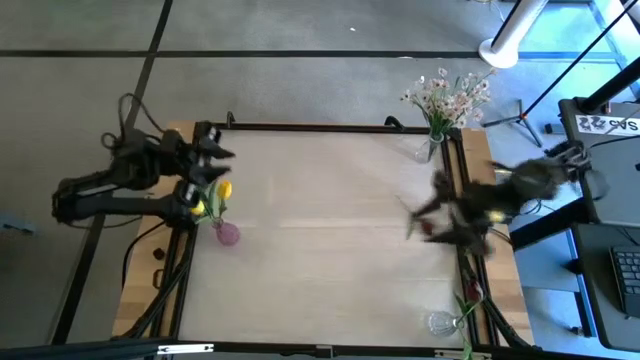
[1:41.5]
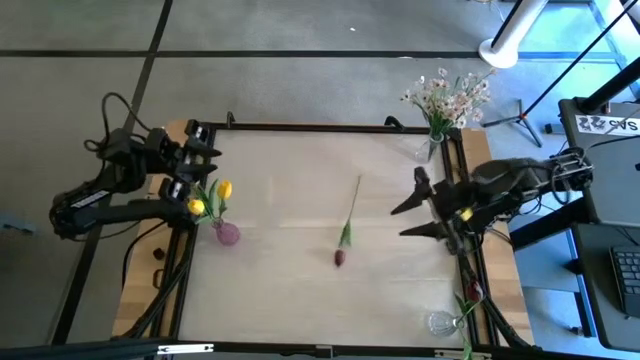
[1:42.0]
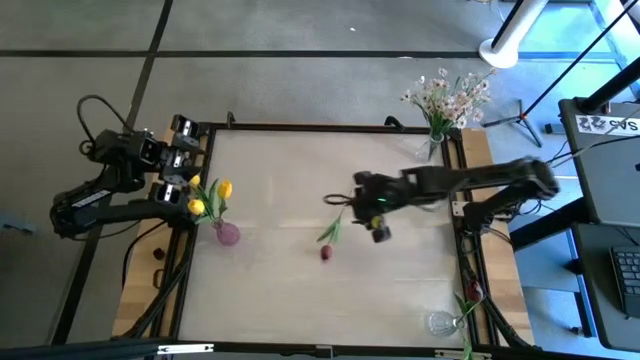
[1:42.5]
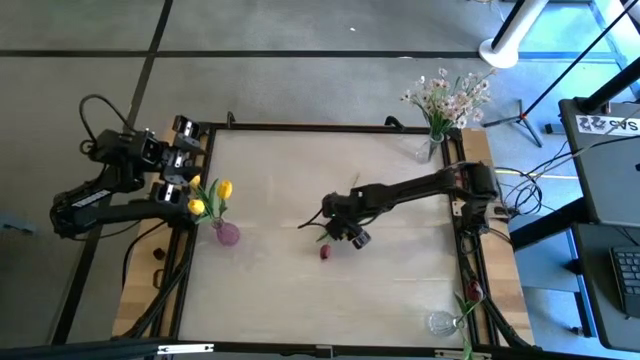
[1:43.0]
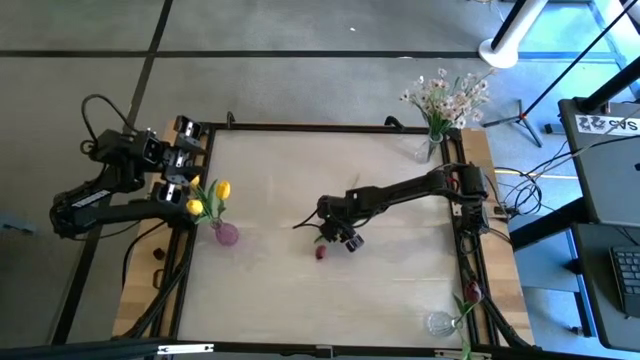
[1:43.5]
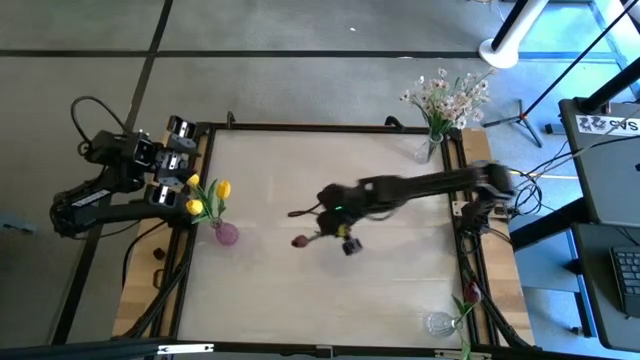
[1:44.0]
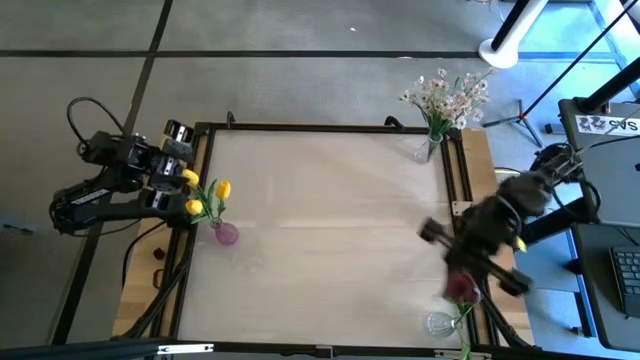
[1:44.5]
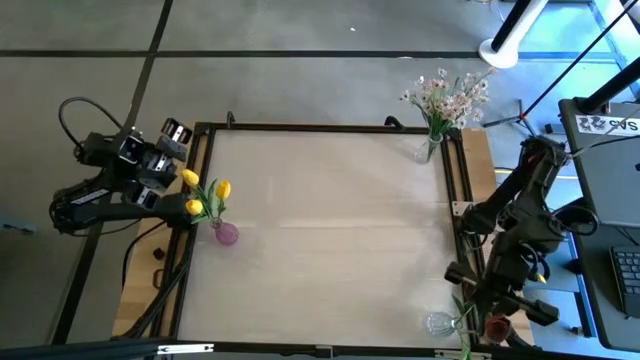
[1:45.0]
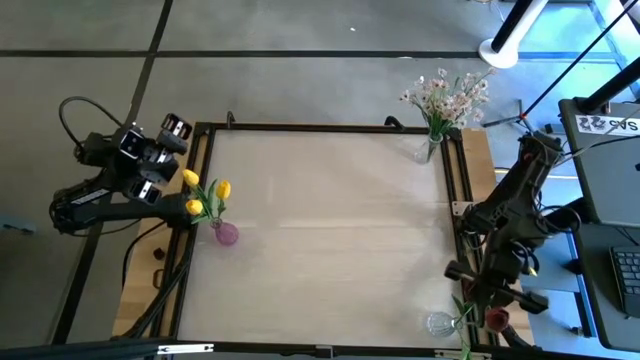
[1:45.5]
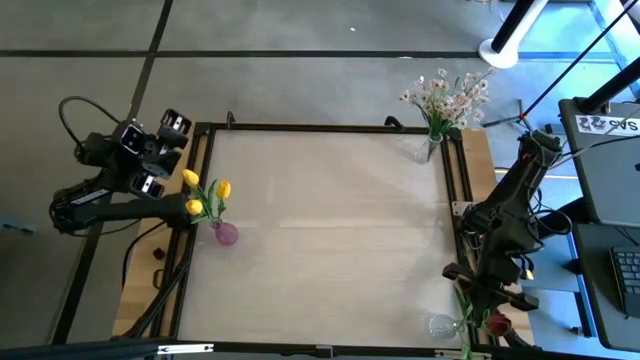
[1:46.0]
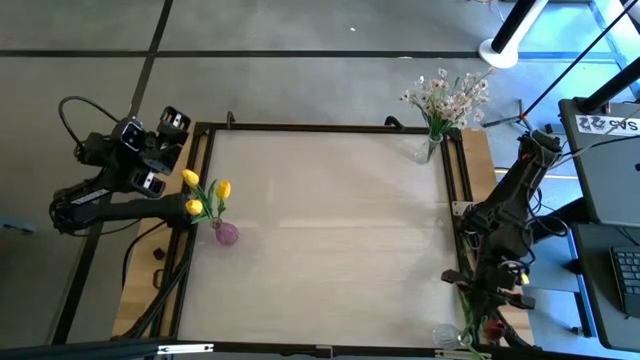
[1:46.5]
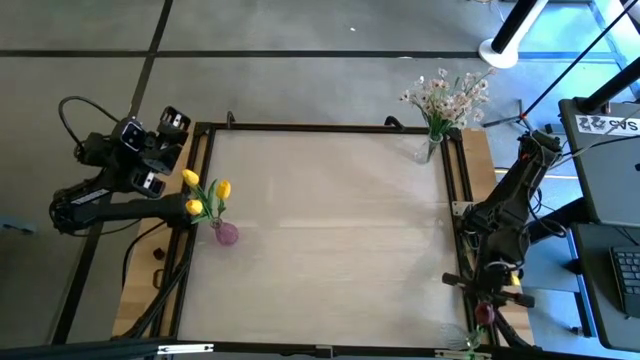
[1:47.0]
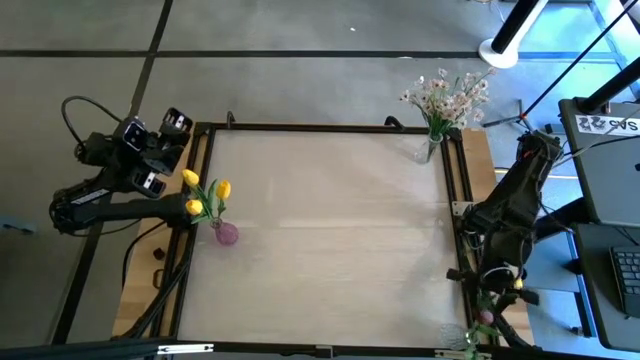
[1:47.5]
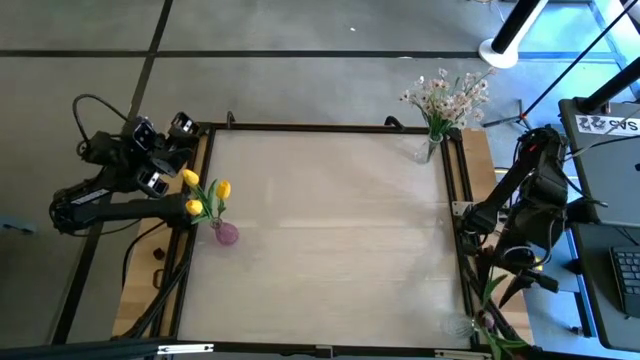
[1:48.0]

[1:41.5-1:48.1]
Task: Sort flowers into vase by color
Put the red tulip into the bottom transparent flower vase

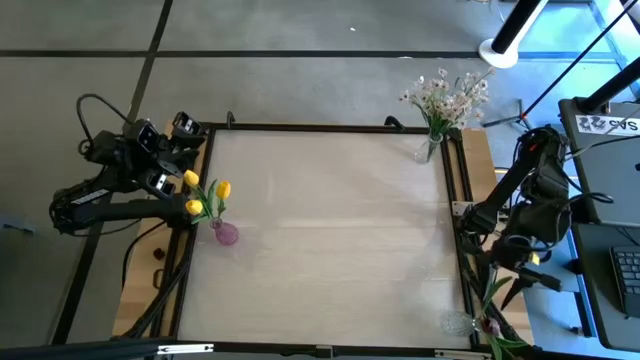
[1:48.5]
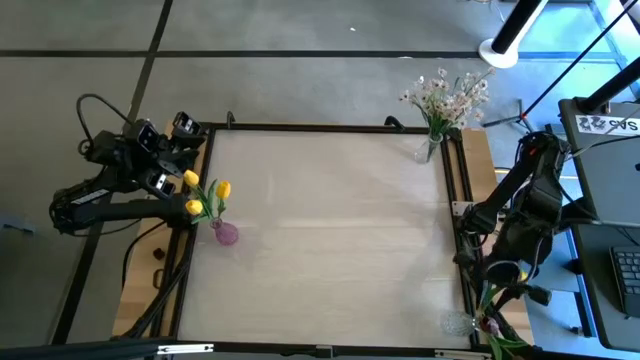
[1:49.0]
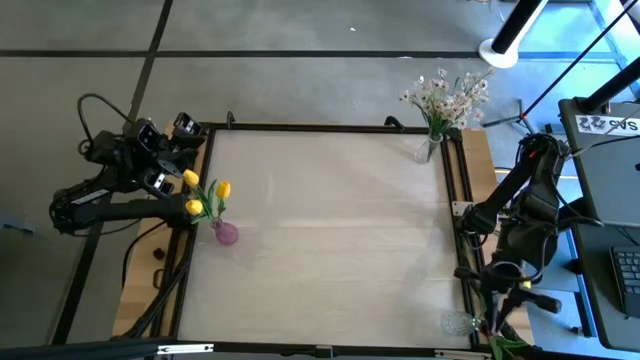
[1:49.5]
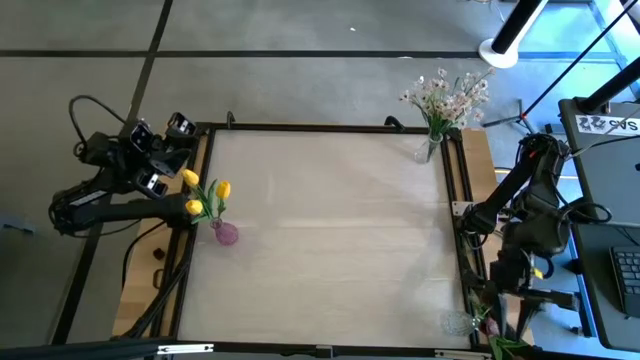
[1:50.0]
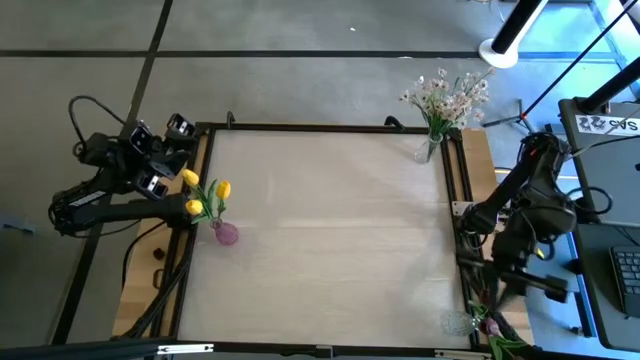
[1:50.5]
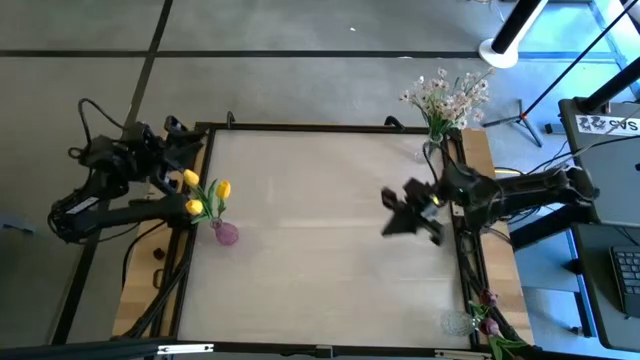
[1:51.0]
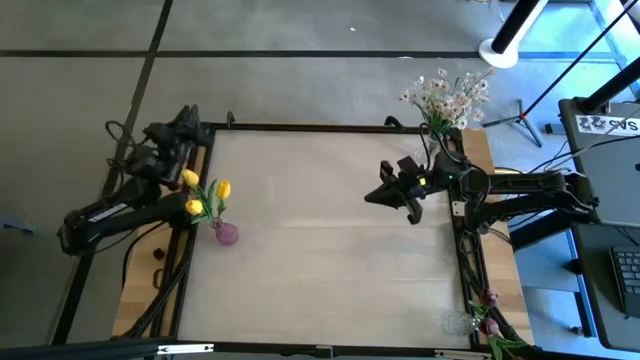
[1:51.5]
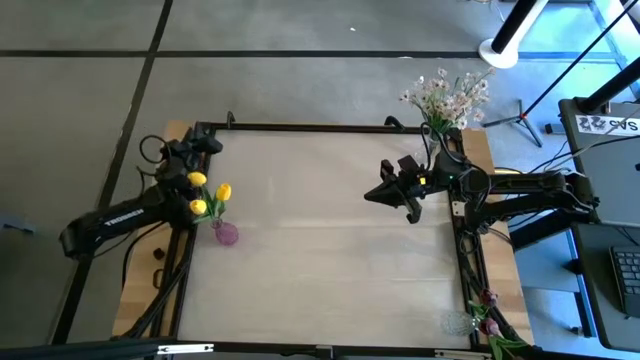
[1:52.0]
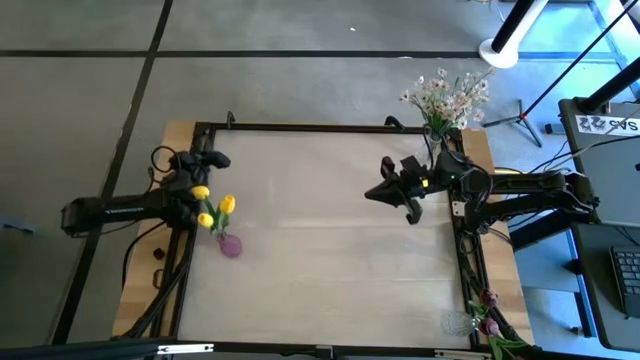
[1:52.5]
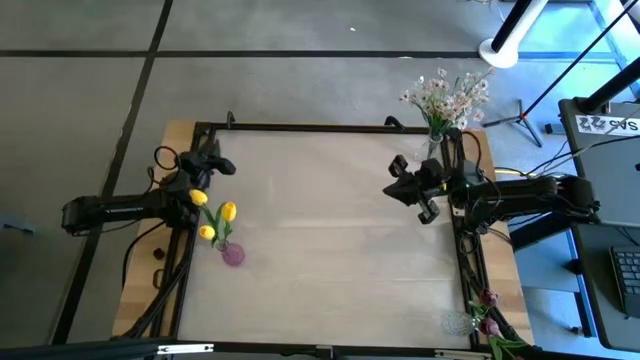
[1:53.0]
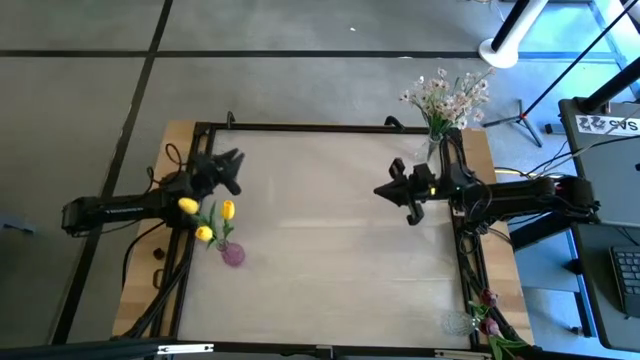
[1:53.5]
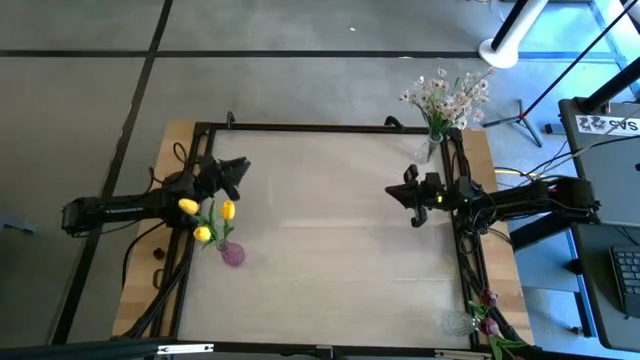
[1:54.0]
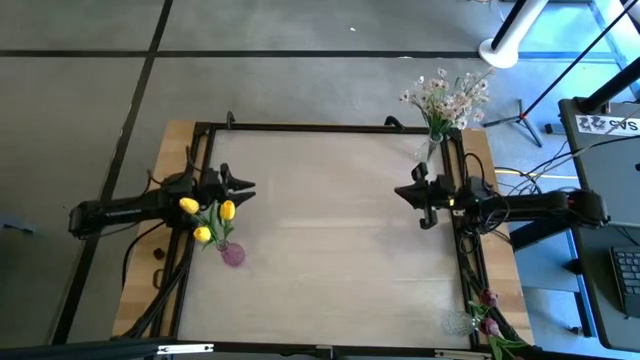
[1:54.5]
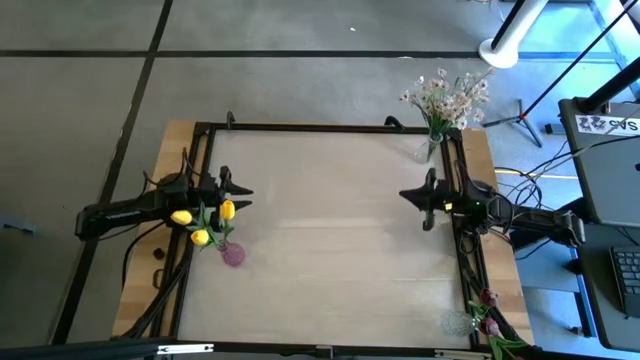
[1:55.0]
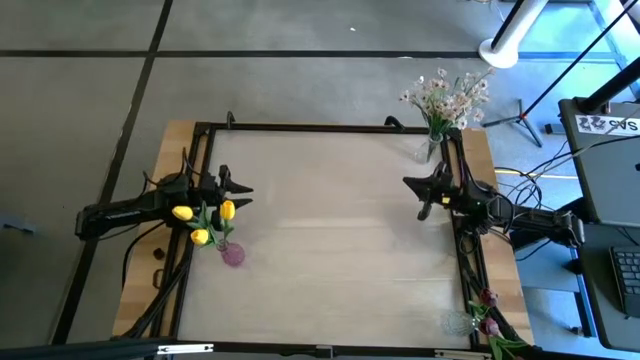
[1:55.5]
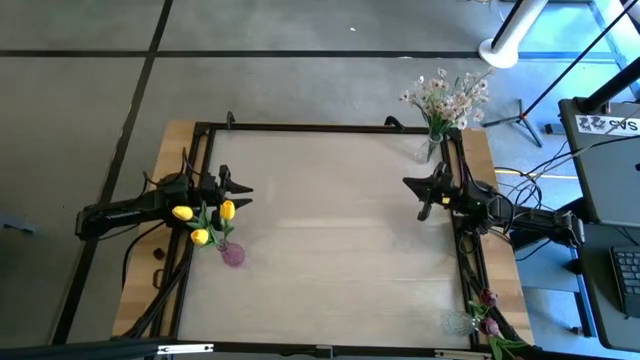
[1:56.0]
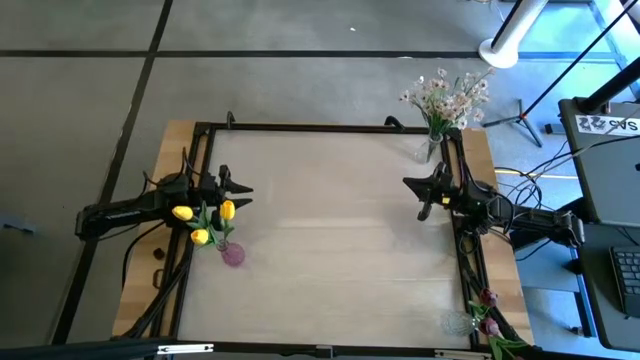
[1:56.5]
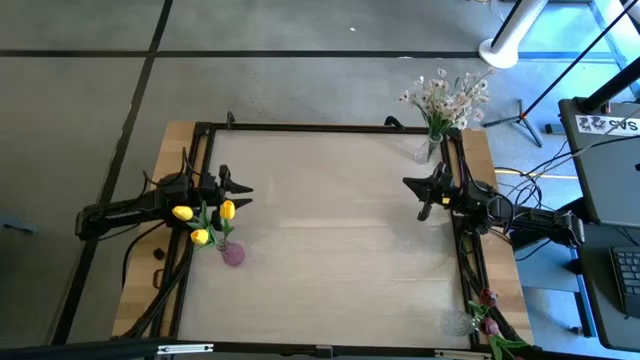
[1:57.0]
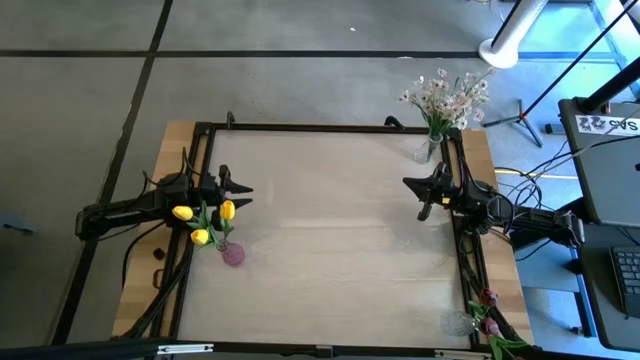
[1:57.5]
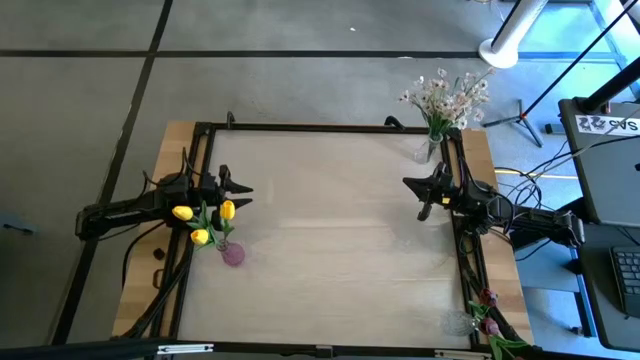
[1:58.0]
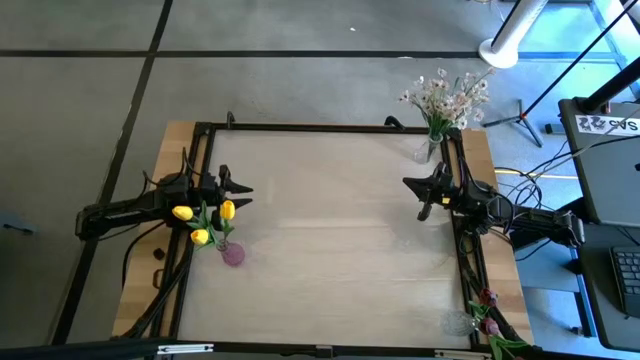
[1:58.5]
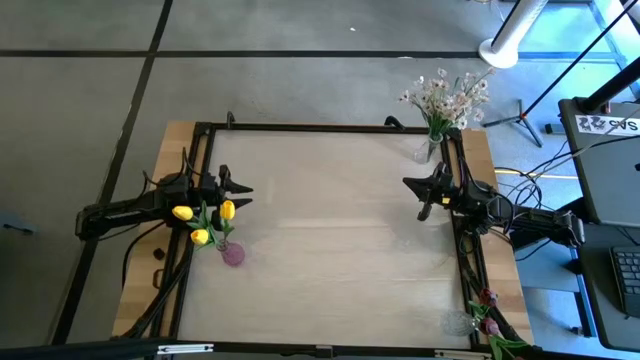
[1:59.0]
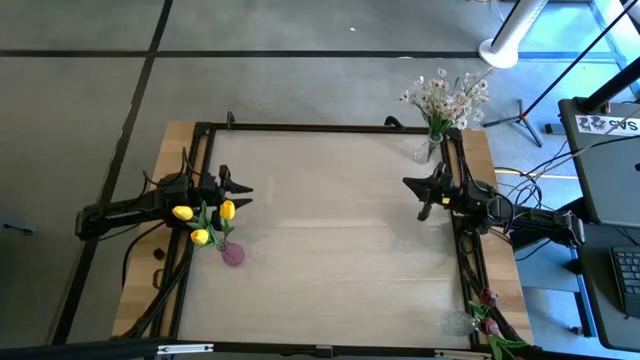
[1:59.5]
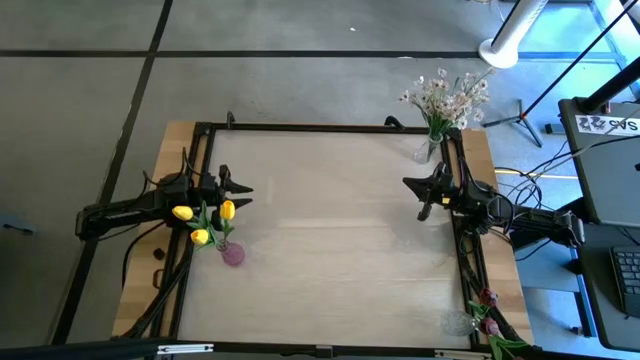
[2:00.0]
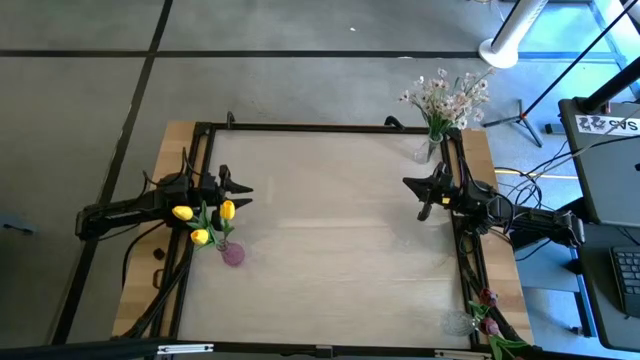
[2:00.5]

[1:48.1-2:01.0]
Return to Home Position

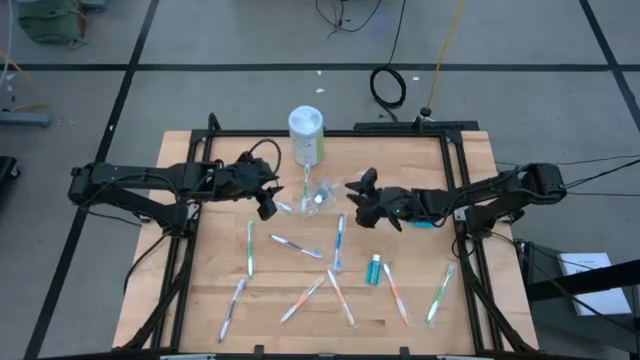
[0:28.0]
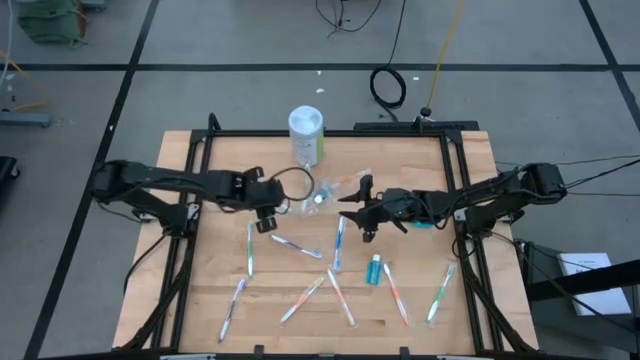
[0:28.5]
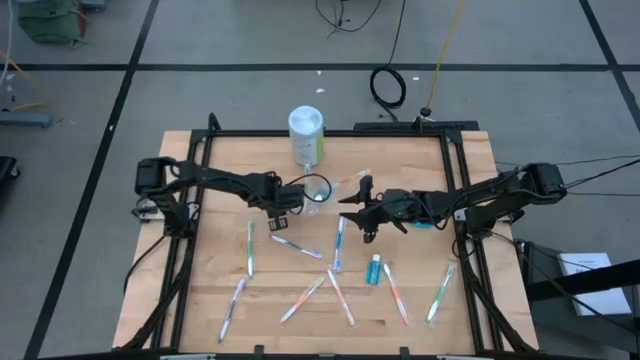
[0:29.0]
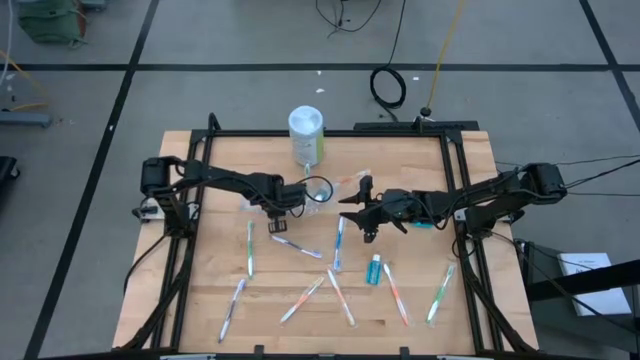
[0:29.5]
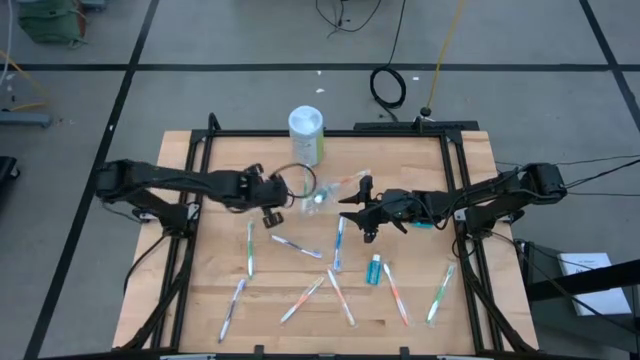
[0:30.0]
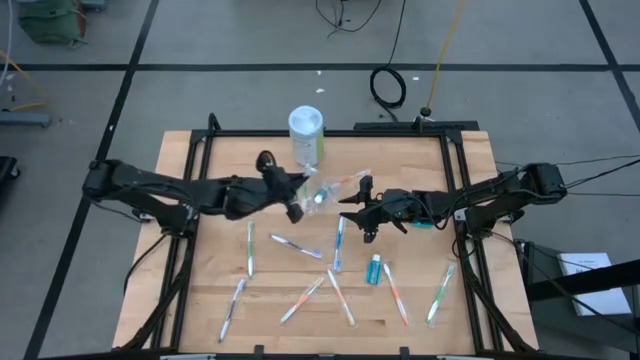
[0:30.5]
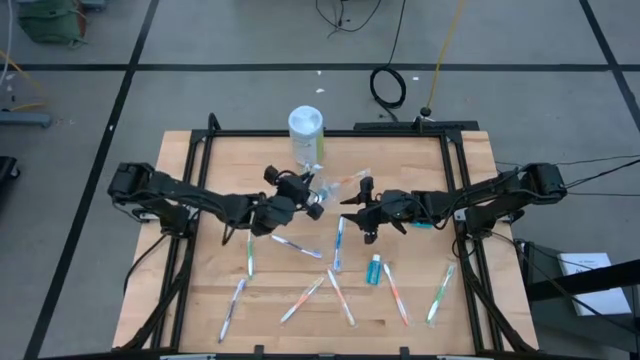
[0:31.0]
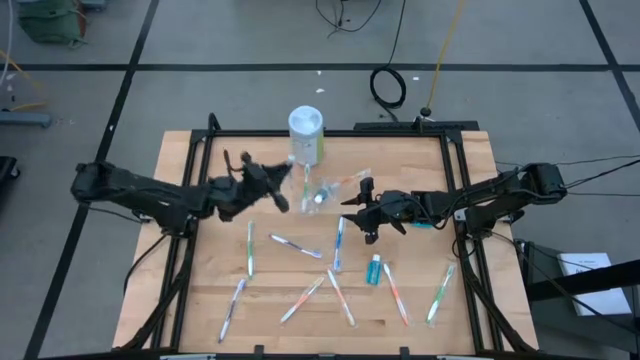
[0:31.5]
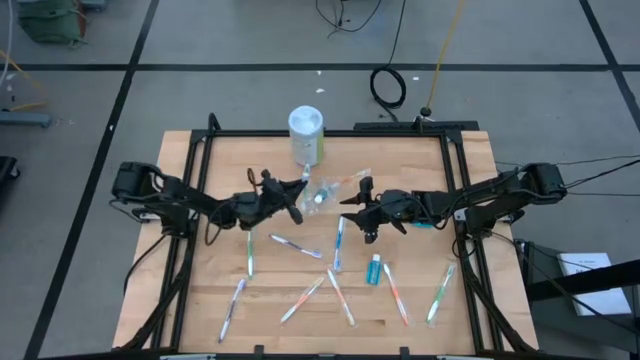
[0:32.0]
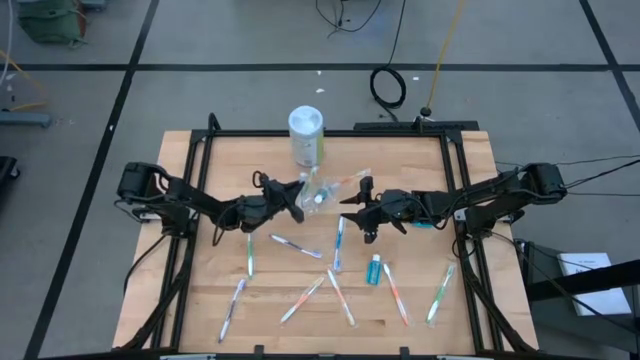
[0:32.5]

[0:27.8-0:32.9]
Task: Pick & Place toothbrushing station
Put the blue toothbrush into the transparent organizer
